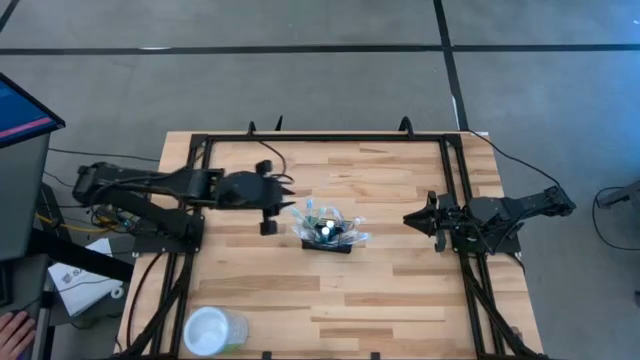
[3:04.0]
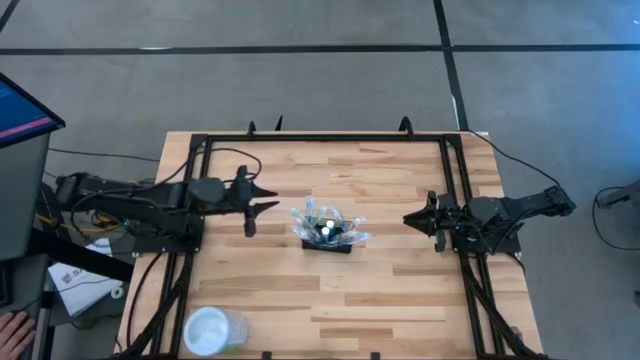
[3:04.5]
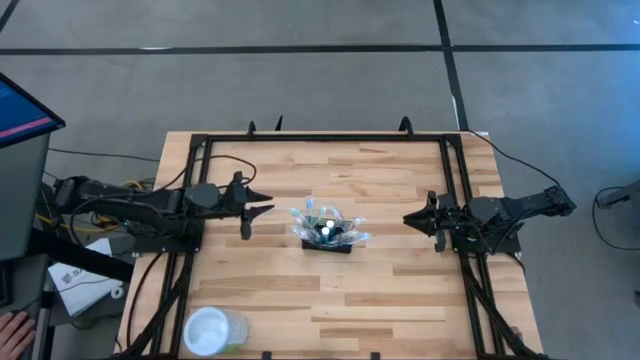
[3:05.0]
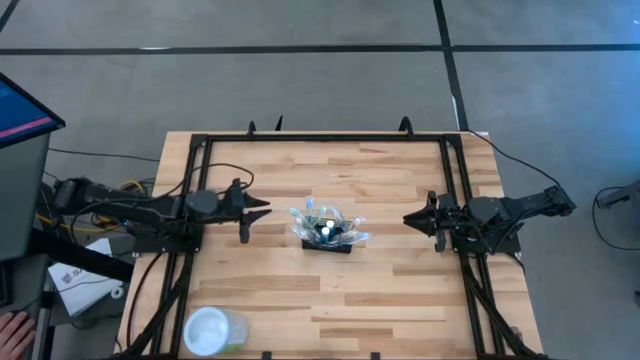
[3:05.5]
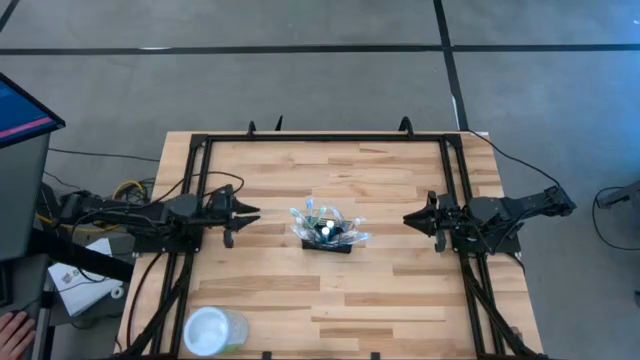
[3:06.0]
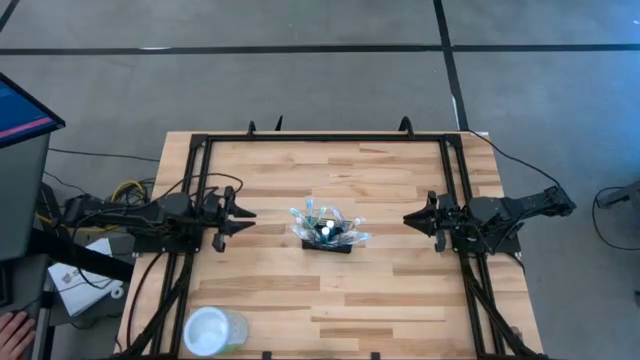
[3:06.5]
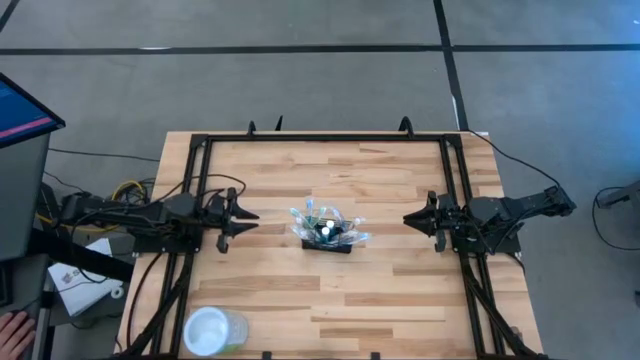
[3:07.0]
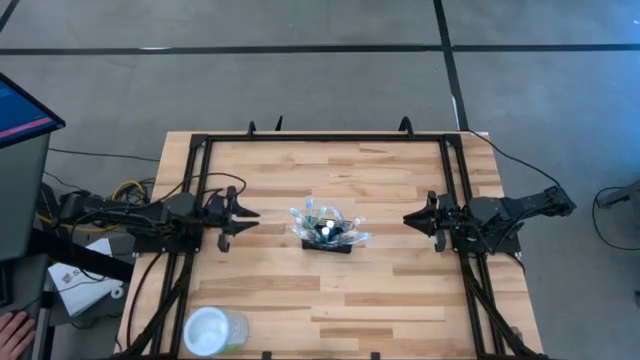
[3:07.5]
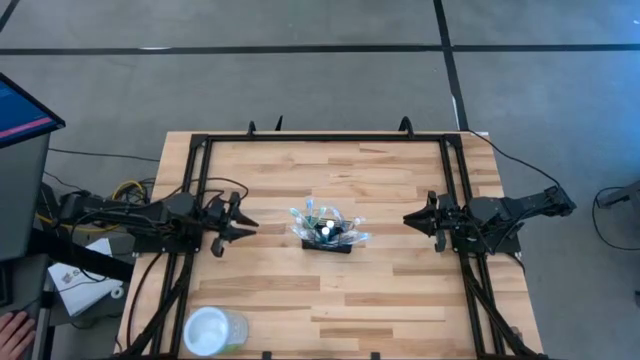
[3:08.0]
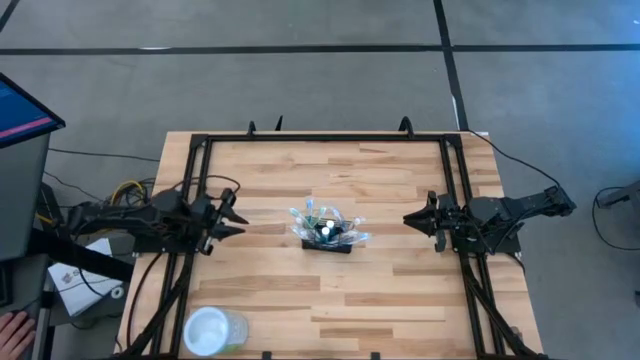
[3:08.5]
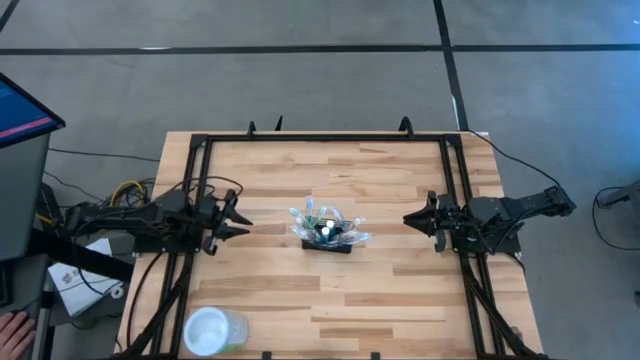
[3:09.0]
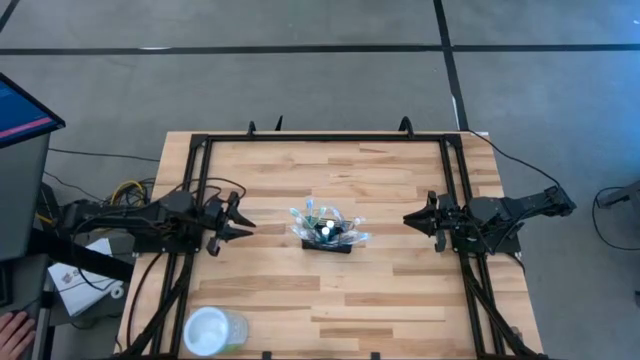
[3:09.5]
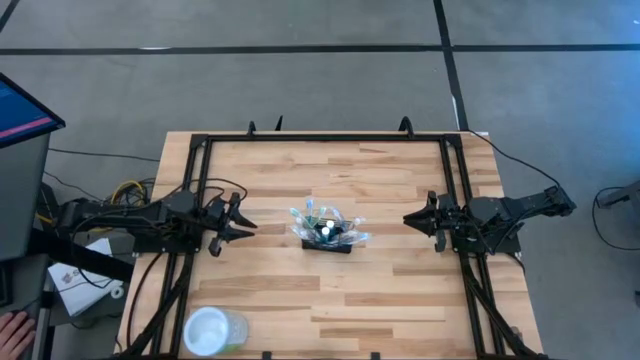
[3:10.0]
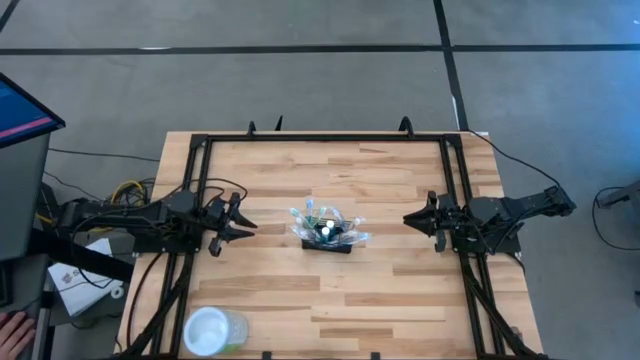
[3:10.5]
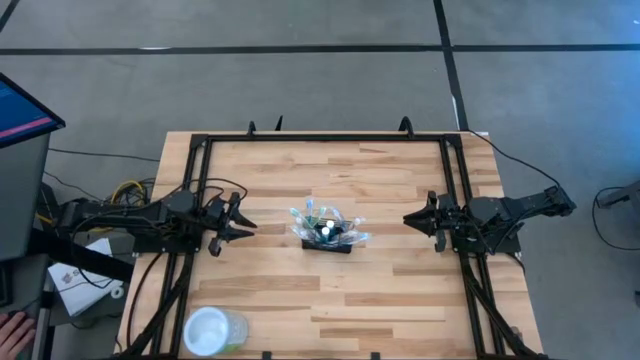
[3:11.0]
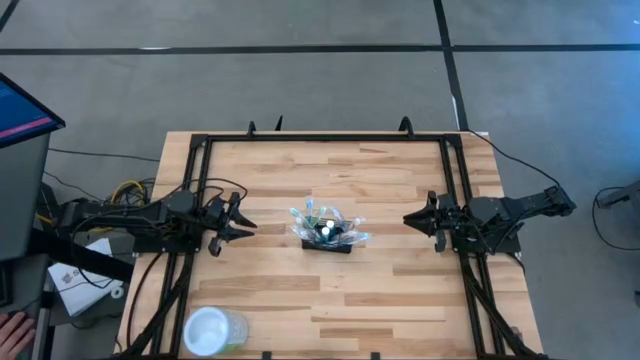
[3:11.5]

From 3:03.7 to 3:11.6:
Task: Pick & Place toothbrushing station
Return to Home Position

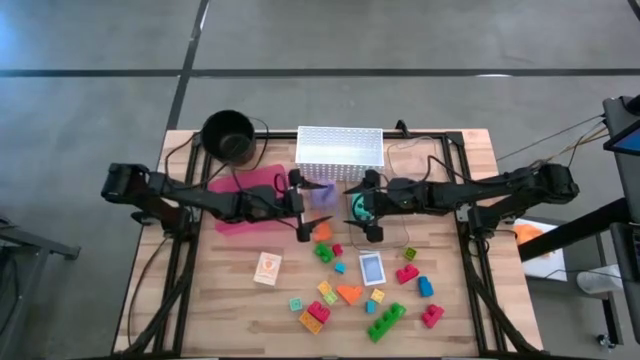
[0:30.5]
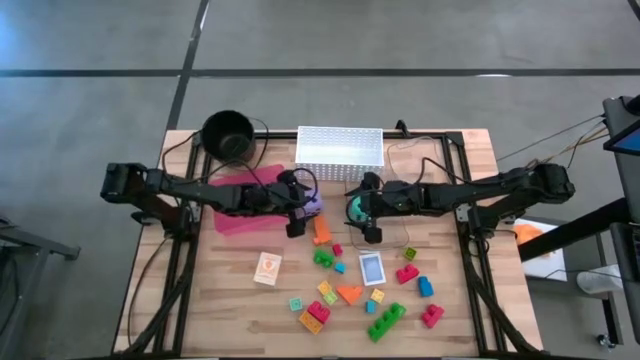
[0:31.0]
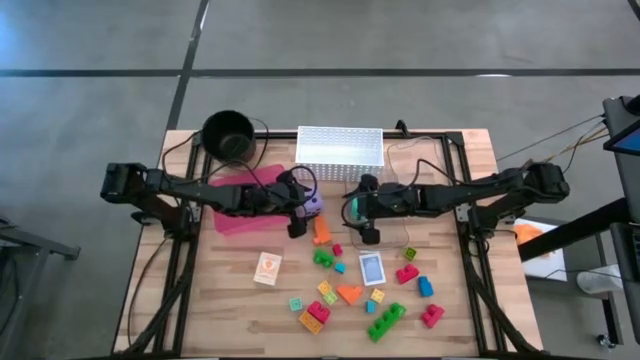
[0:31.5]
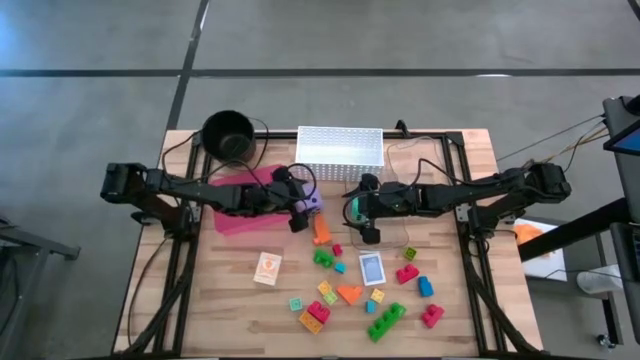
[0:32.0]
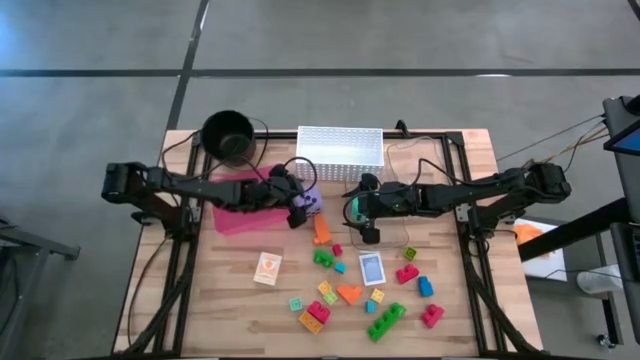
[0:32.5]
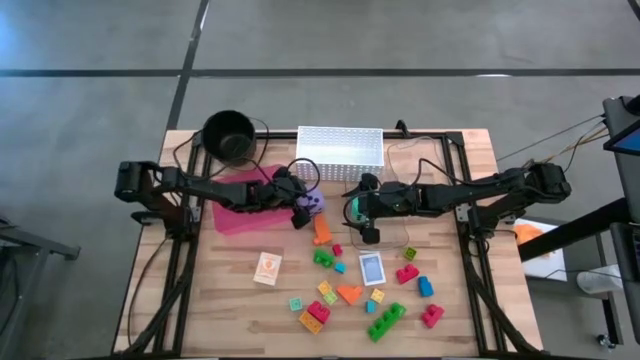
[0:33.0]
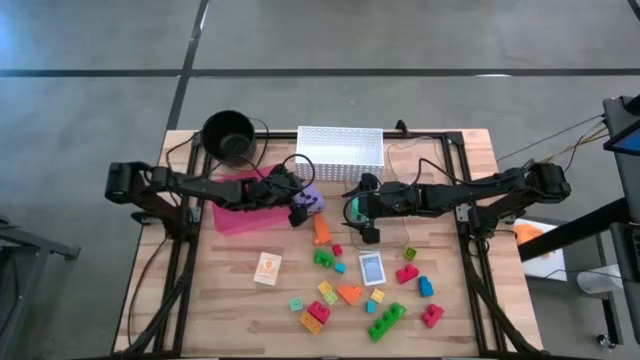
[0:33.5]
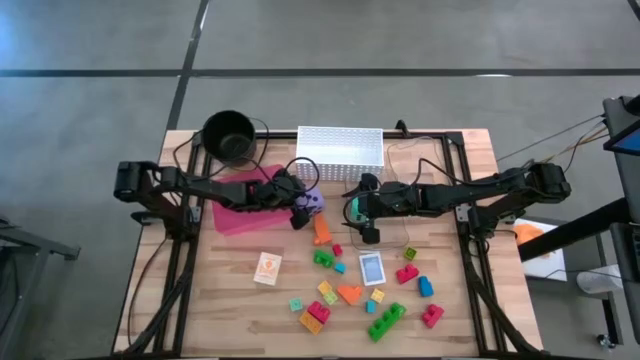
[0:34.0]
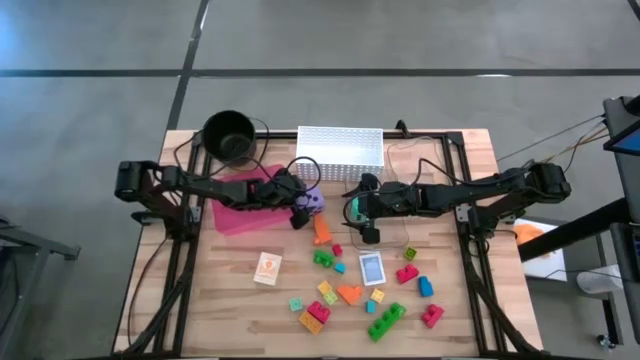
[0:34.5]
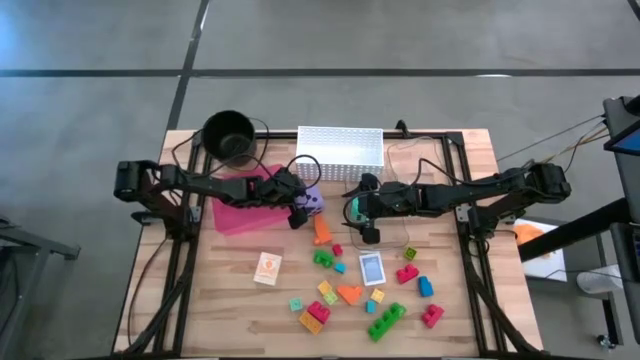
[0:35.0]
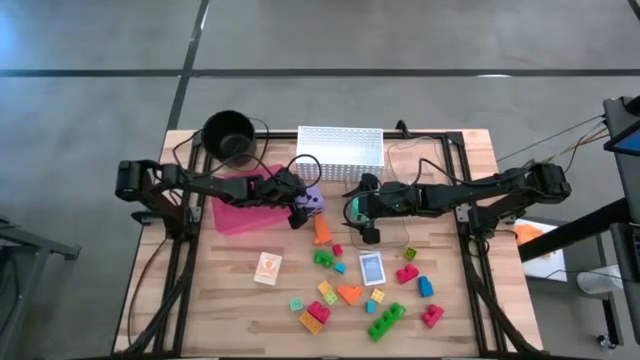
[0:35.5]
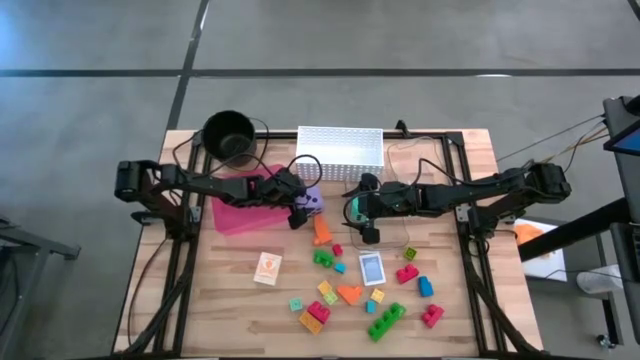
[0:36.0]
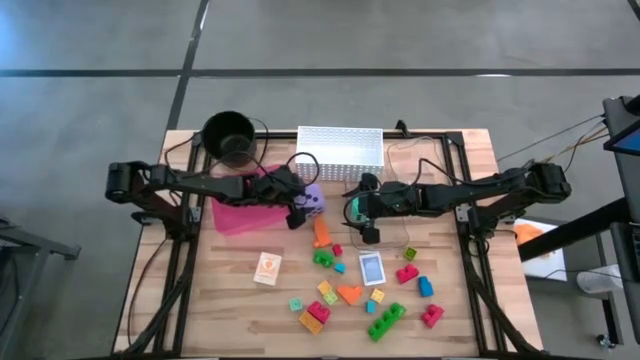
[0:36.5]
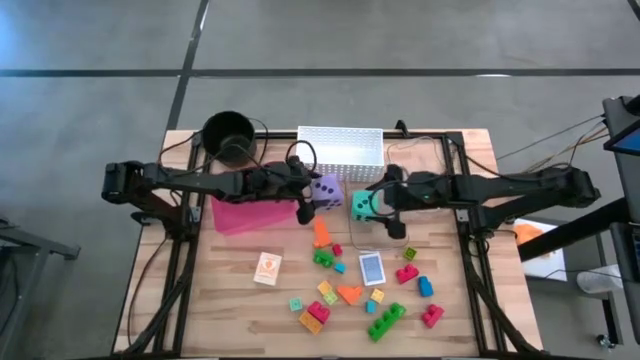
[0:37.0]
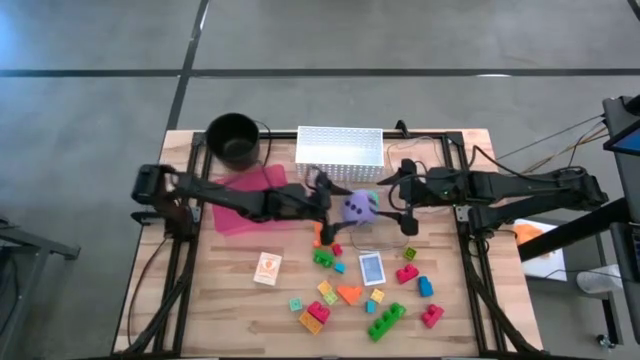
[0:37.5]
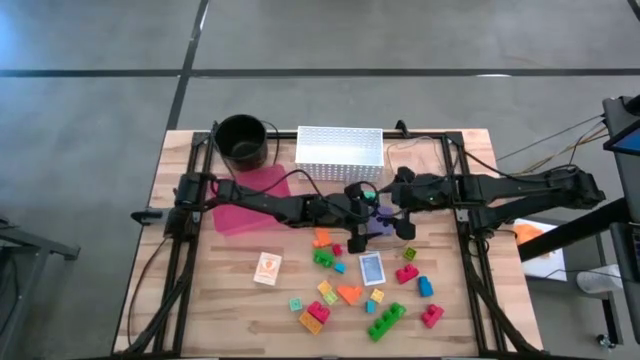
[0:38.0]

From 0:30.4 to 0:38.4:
Task: Pick & Place Toys
Put the purple dice into the left transparent bin
